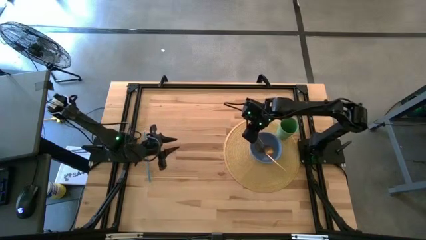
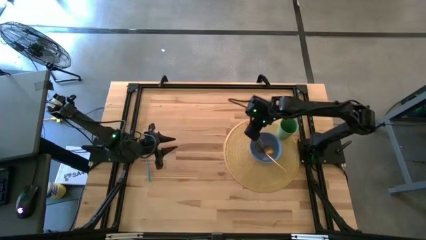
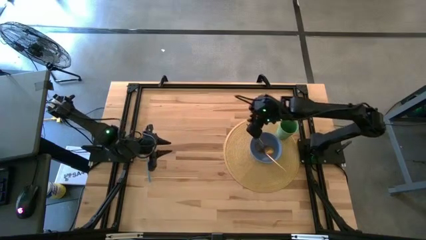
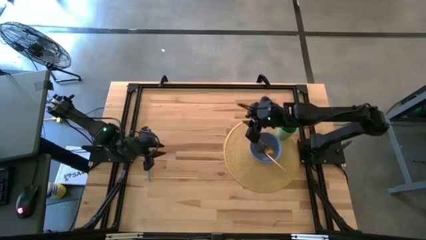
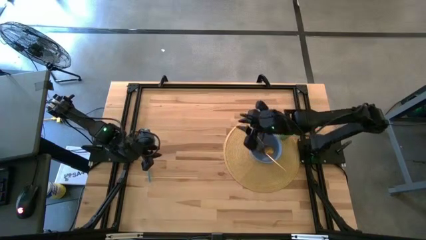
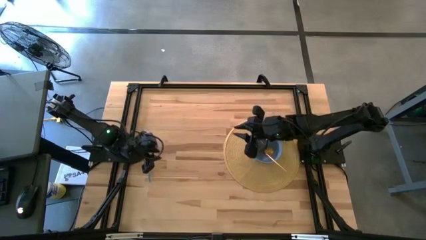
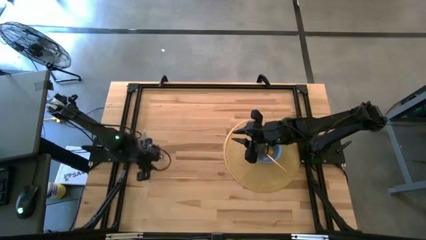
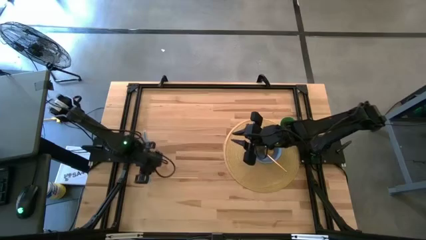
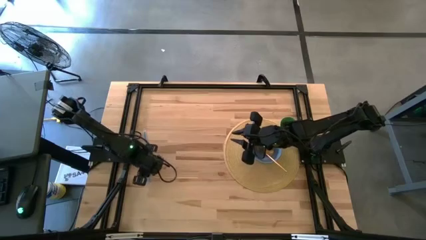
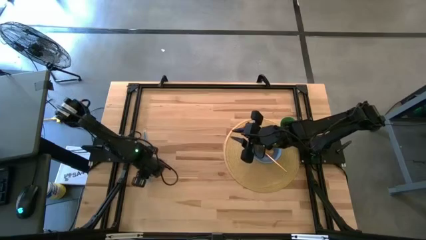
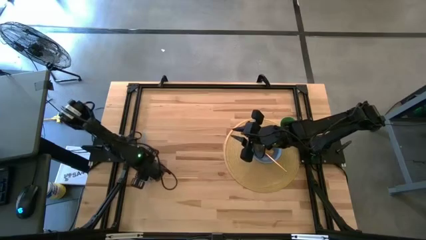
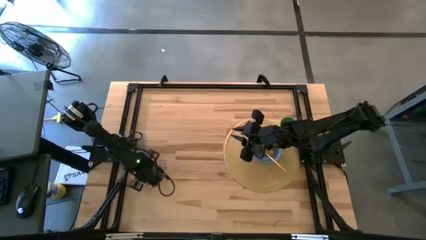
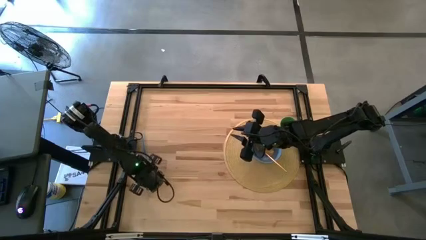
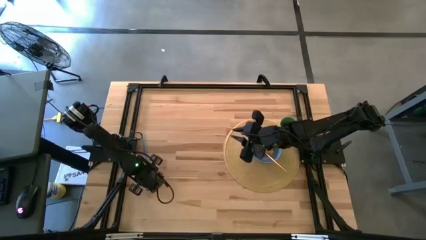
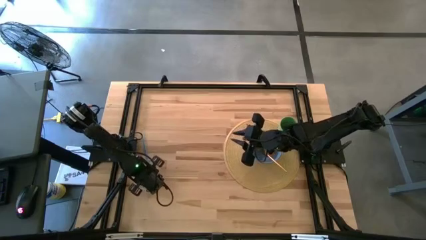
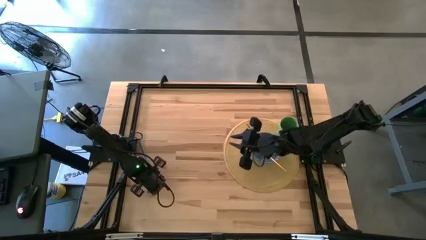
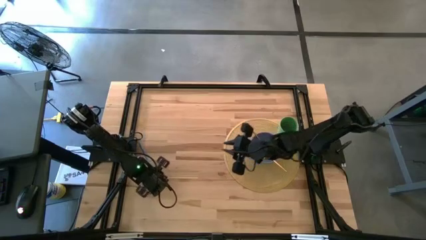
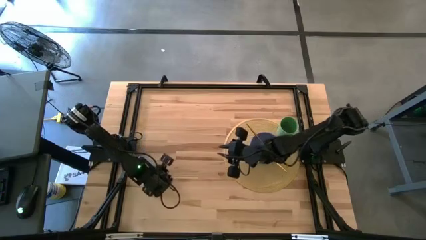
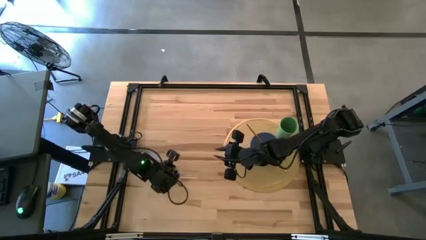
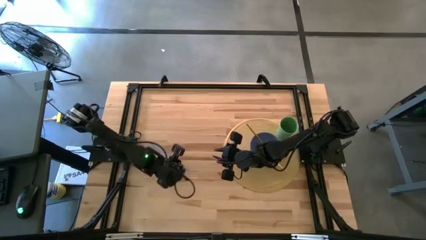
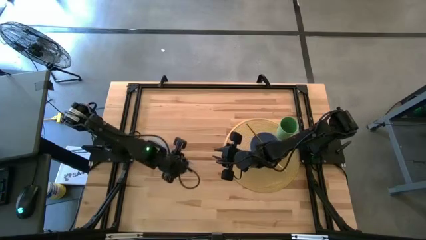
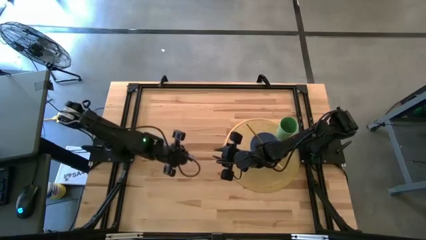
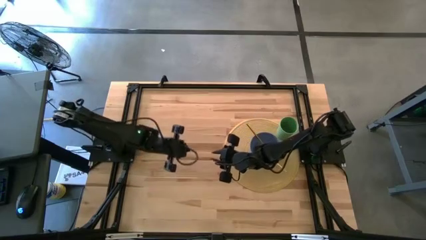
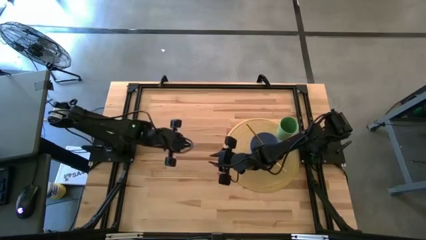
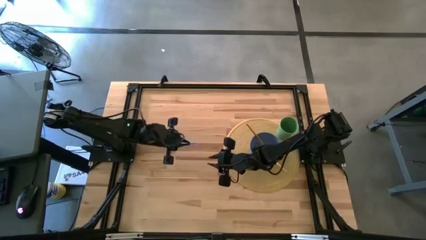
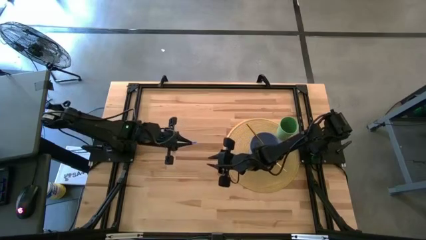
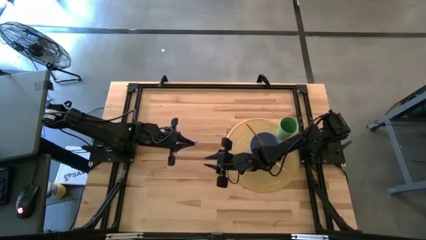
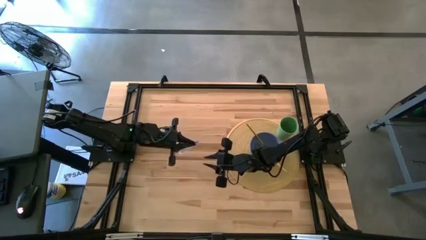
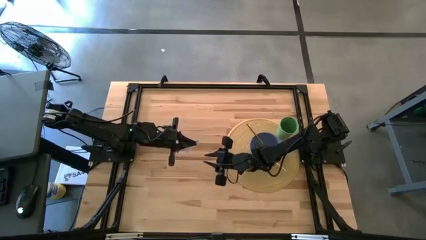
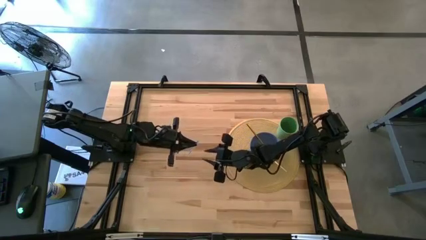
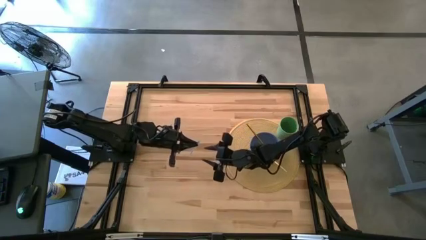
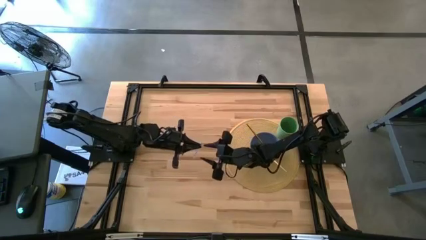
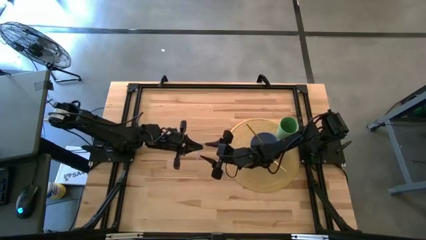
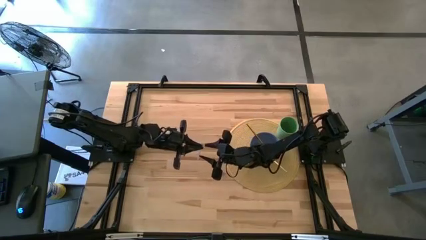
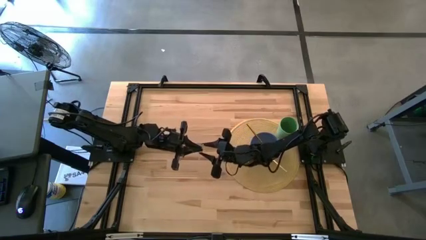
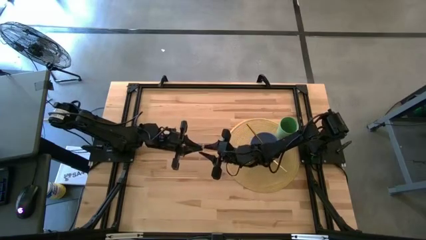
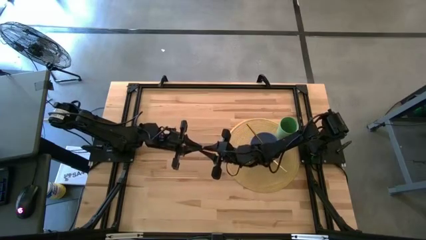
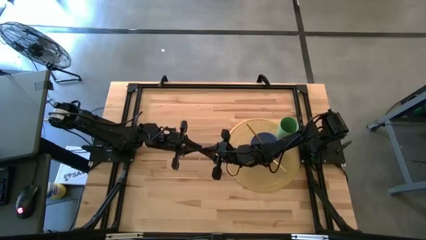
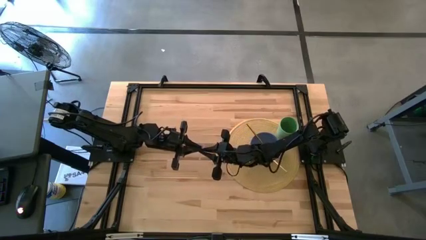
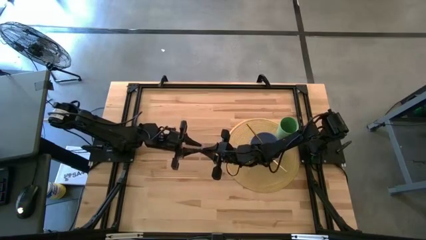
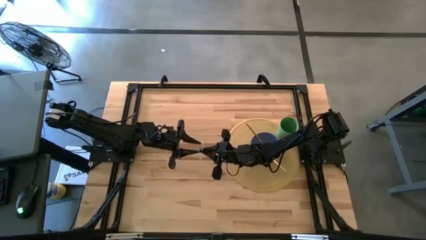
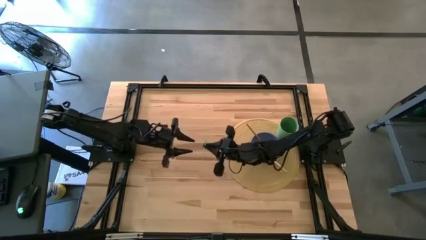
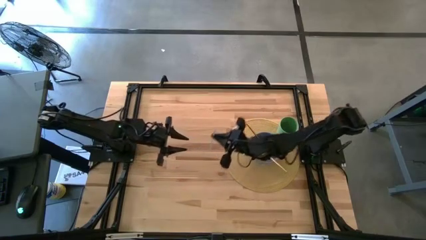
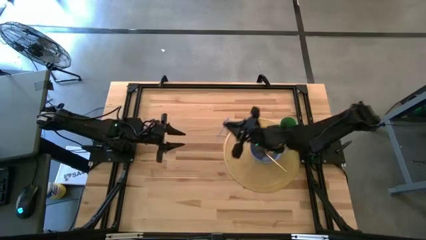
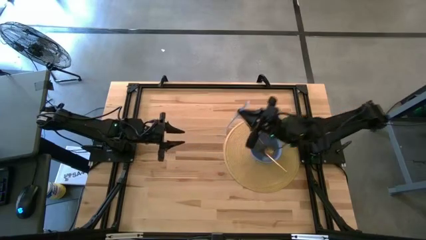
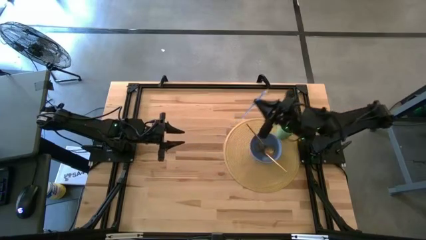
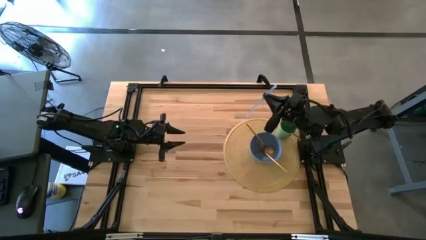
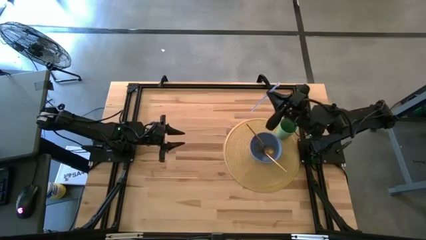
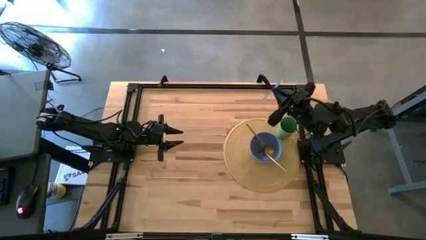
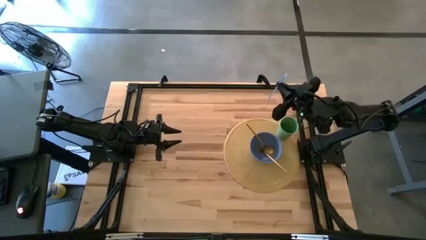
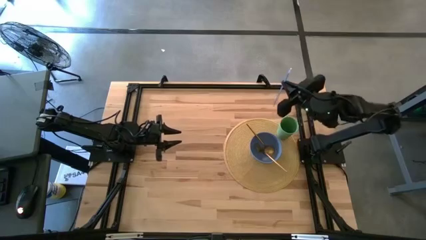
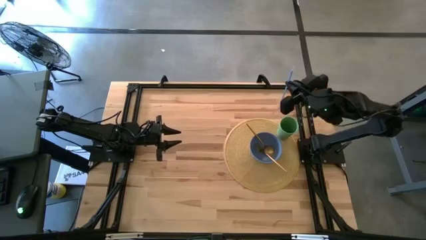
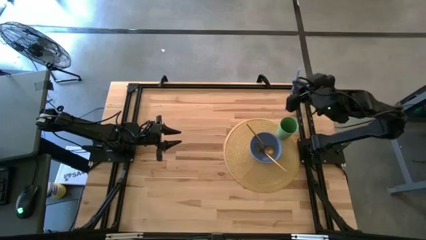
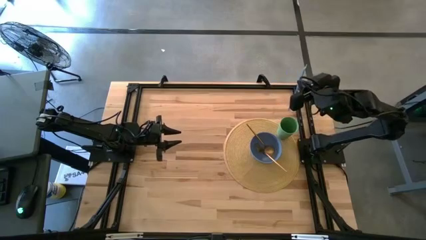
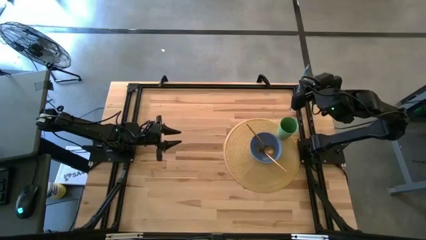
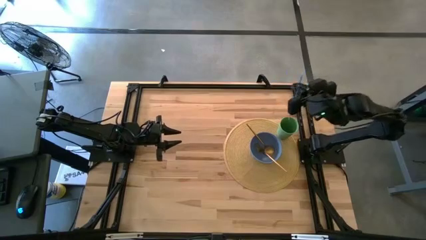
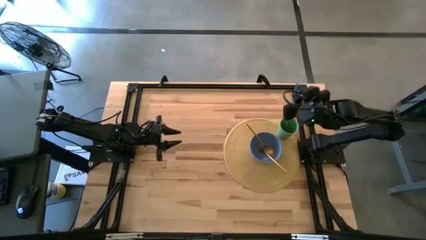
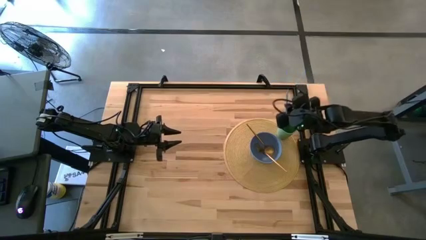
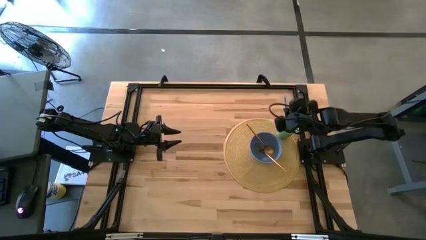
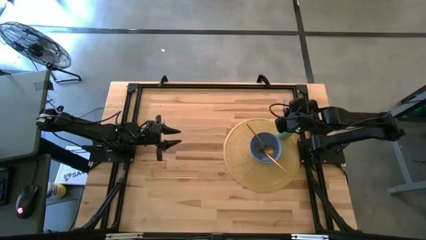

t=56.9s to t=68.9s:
Task: Pick & Place Utensil
Put the blue straw into the green cup on the brown placemat
